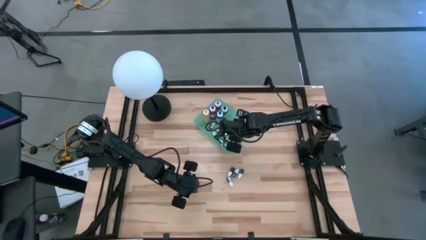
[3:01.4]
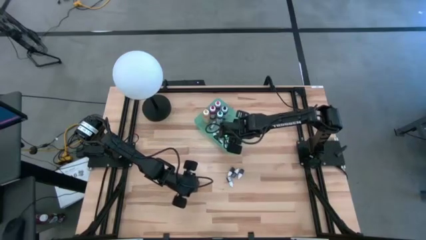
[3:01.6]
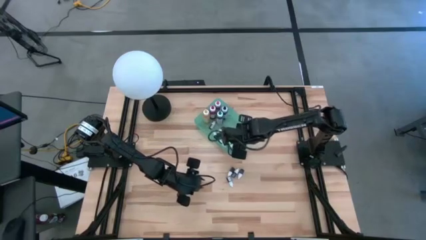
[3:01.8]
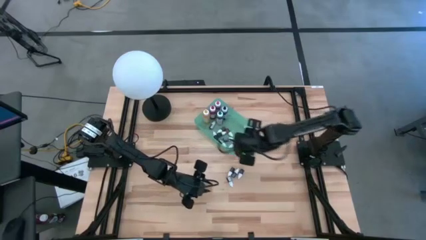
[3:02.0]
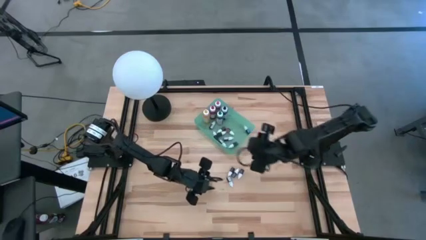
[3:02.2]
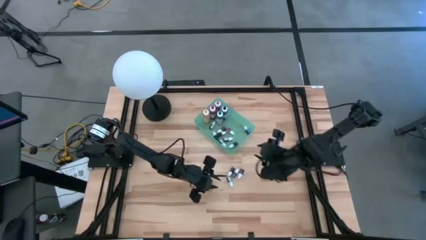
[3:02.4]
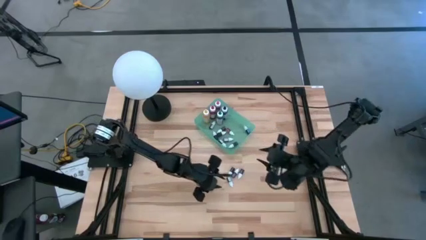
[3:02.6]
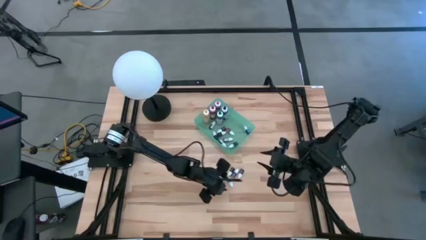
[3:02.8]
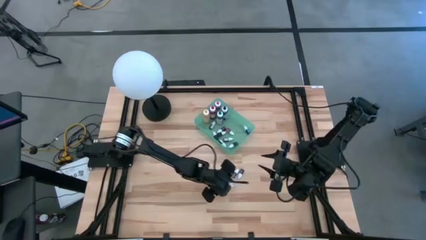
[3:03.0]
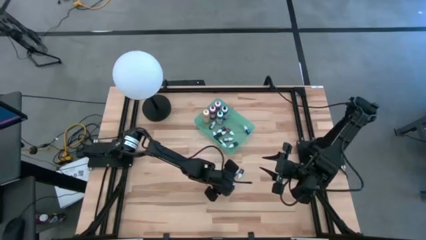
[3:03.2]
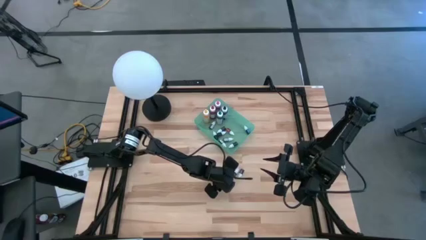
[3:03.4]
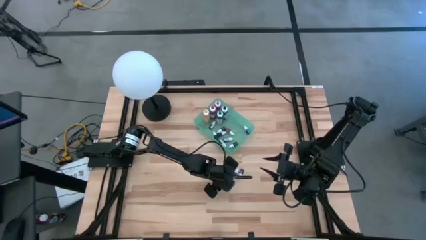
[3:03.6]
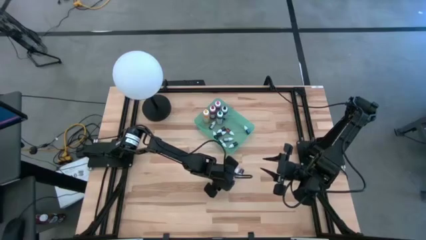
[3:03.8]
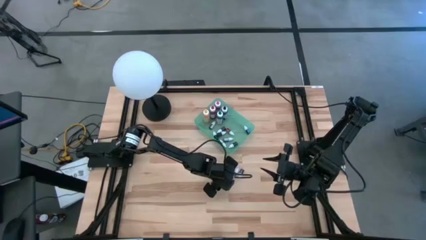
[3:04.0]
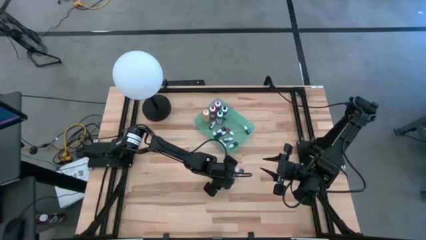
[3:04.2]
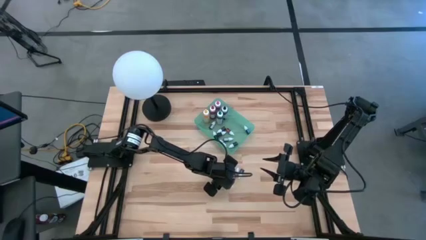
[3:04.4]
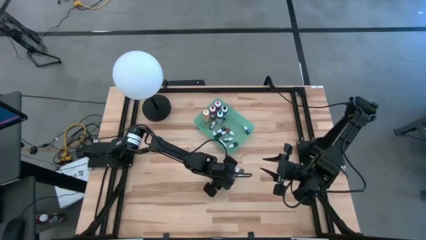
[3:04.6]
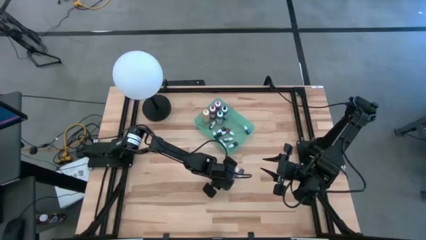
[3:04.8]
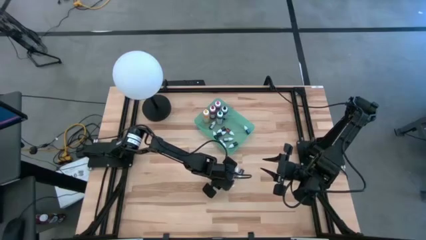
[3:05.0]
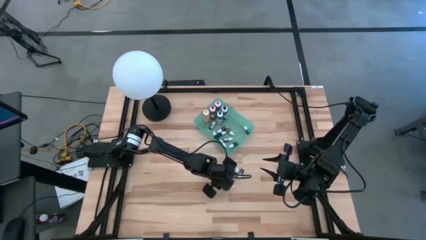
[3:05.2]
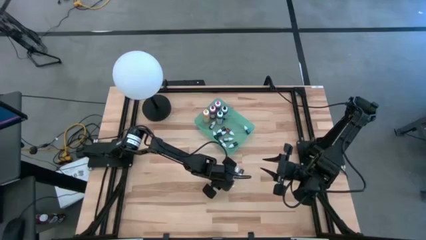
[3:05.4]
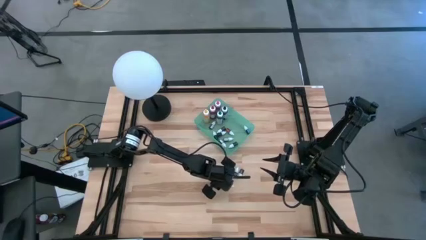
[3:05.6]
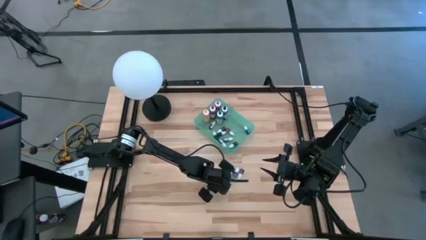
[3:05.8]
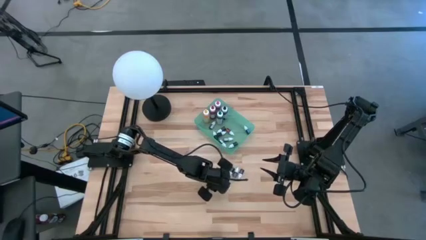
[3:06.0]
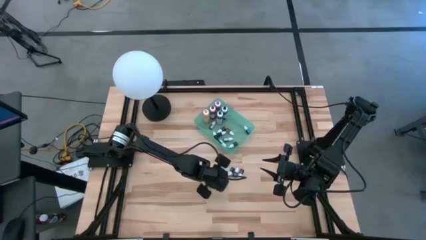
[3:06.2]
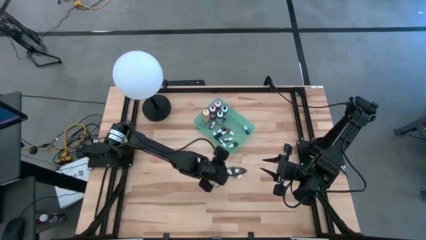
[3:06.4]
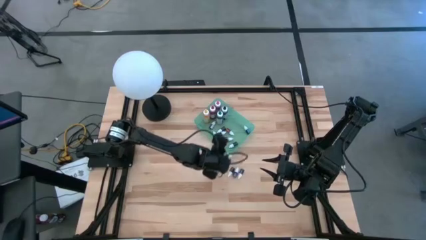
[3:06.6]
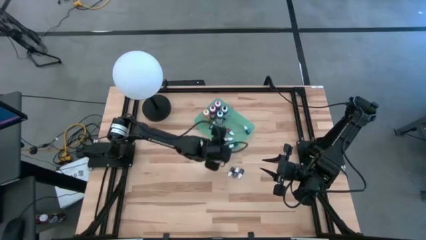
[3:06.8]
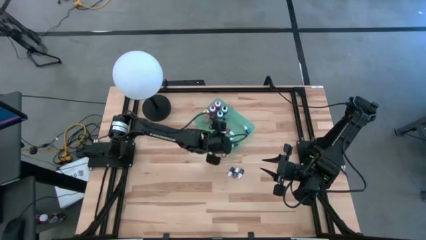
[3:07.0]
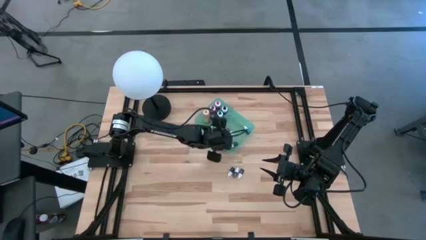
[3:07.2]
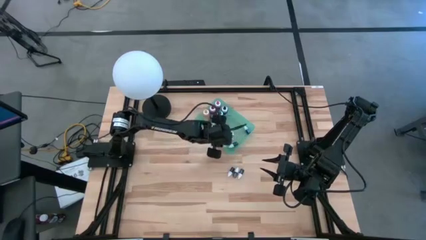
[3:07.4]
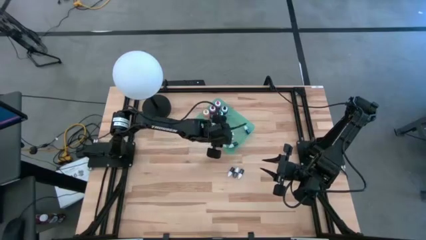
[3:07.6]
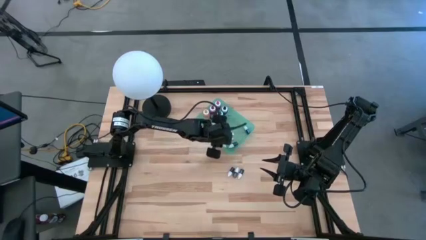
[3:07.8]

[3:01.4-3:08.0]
Task: Pick & Place food coloring
Put the small black food coloring bottle into the green bin

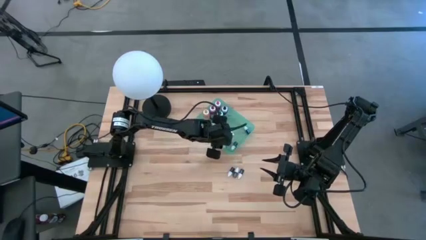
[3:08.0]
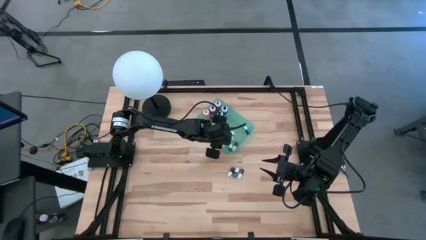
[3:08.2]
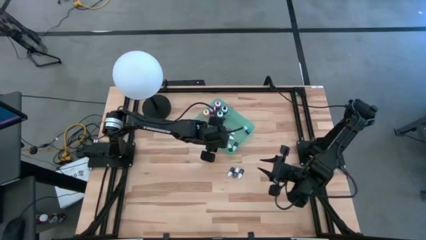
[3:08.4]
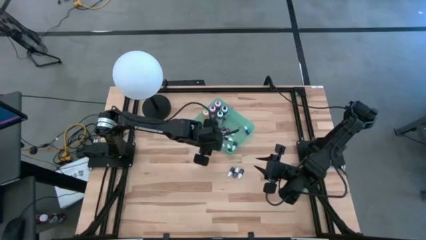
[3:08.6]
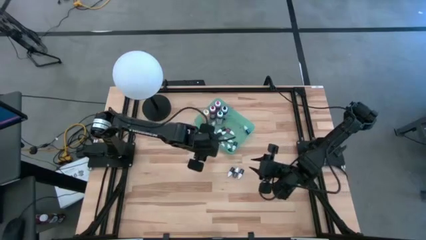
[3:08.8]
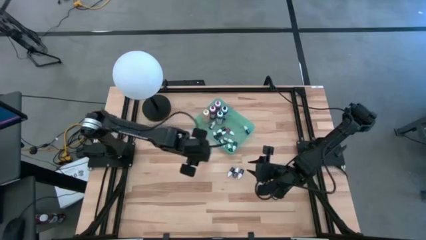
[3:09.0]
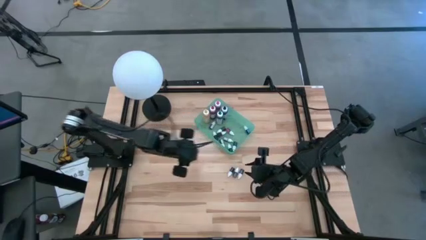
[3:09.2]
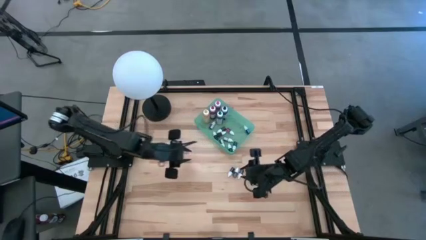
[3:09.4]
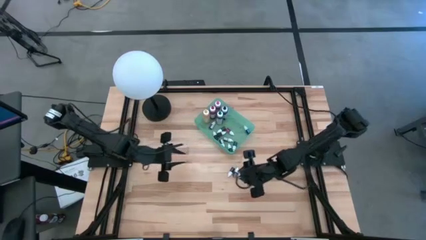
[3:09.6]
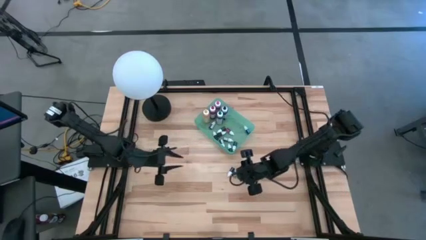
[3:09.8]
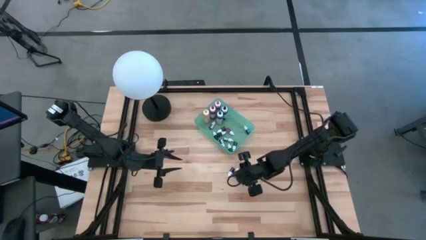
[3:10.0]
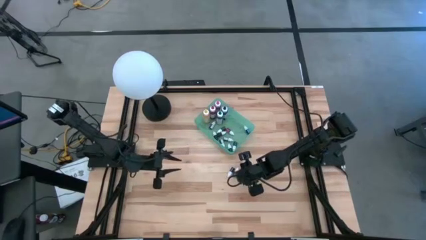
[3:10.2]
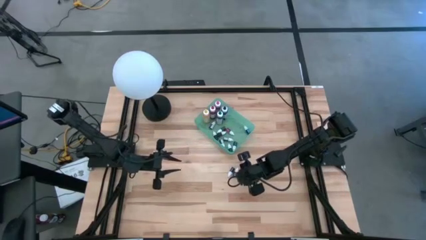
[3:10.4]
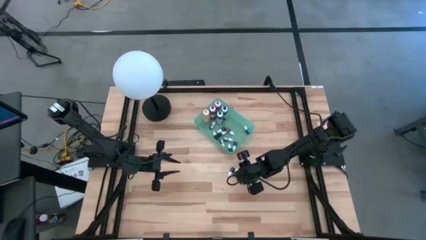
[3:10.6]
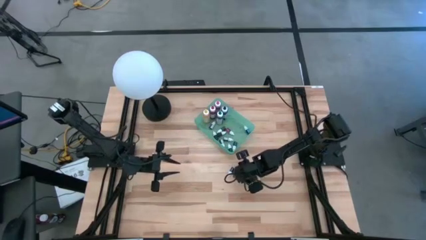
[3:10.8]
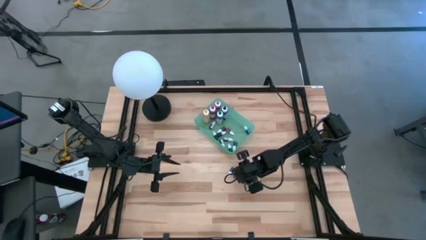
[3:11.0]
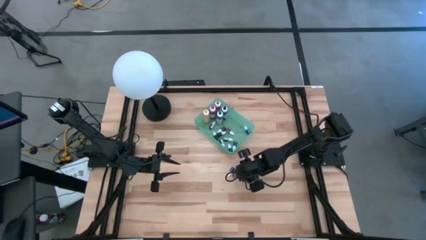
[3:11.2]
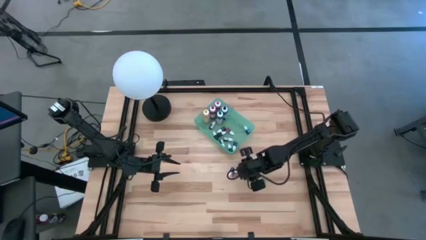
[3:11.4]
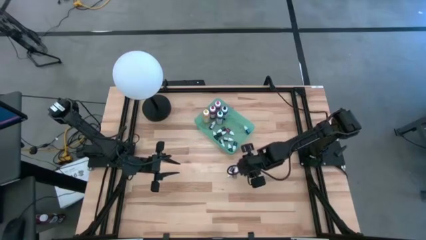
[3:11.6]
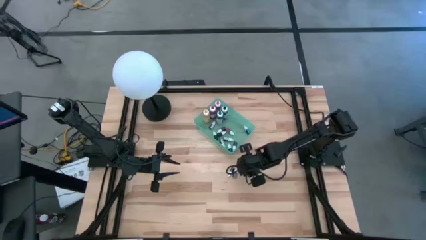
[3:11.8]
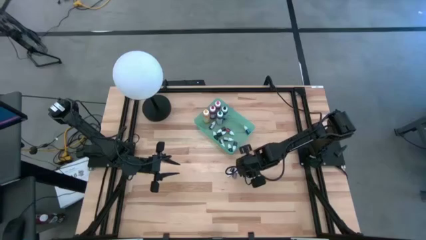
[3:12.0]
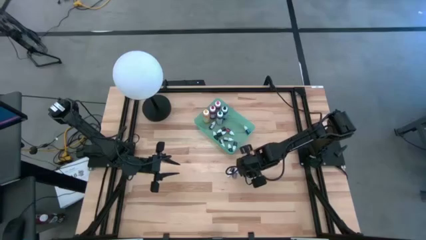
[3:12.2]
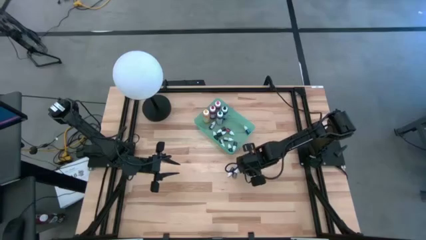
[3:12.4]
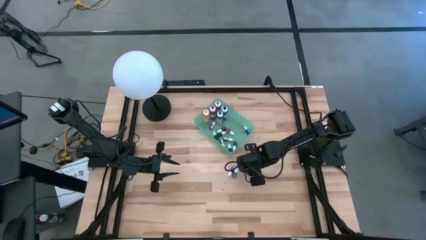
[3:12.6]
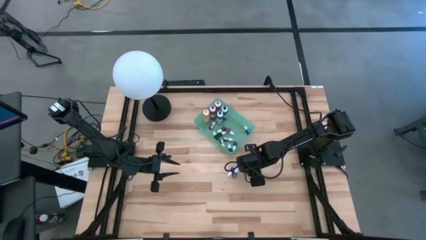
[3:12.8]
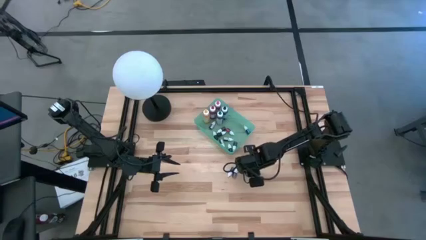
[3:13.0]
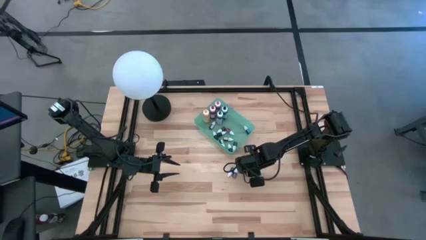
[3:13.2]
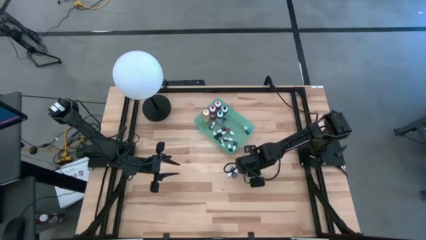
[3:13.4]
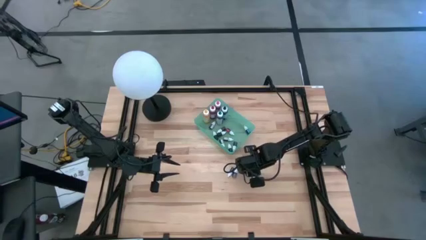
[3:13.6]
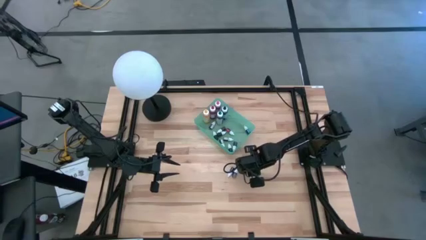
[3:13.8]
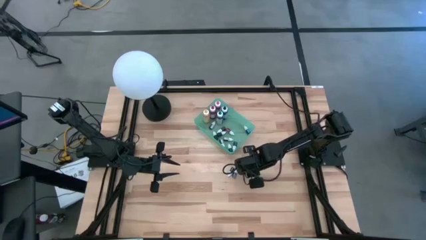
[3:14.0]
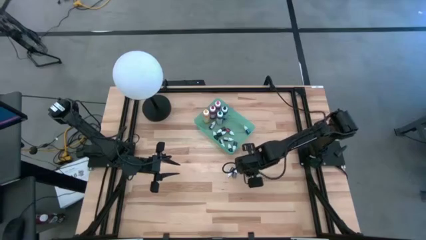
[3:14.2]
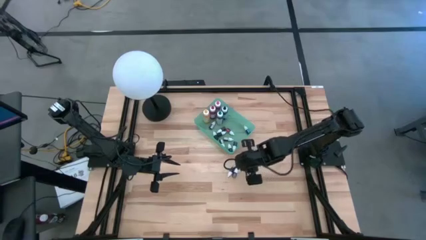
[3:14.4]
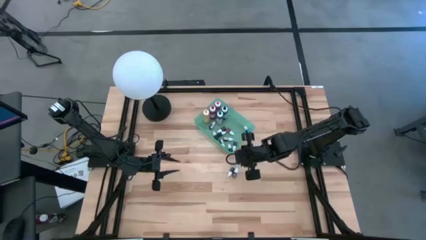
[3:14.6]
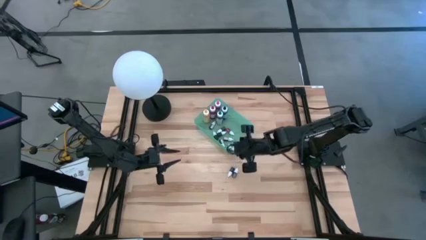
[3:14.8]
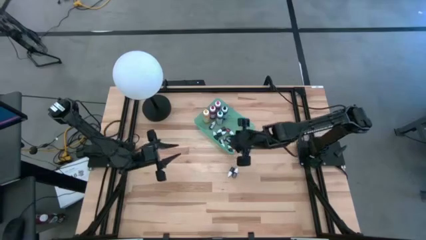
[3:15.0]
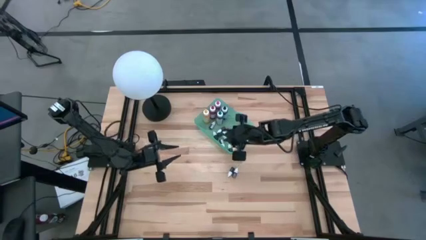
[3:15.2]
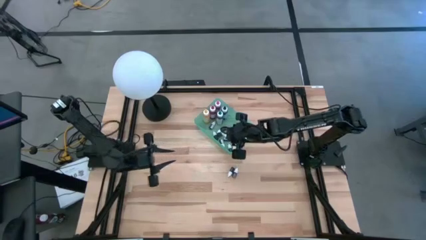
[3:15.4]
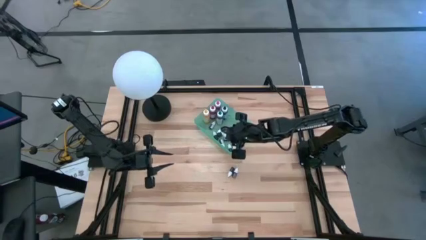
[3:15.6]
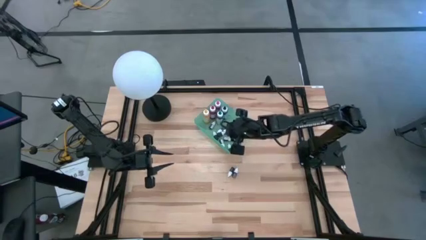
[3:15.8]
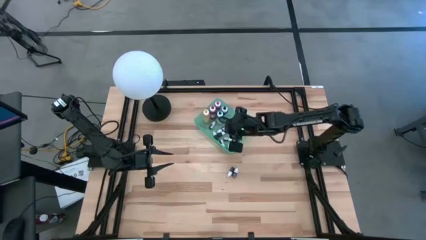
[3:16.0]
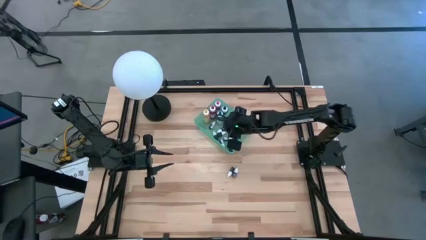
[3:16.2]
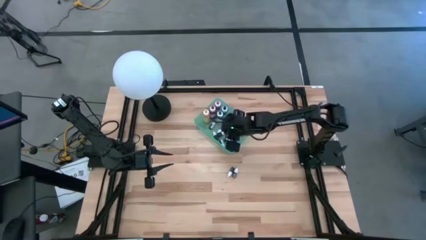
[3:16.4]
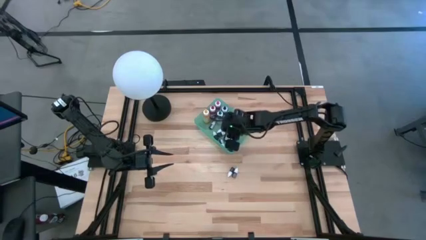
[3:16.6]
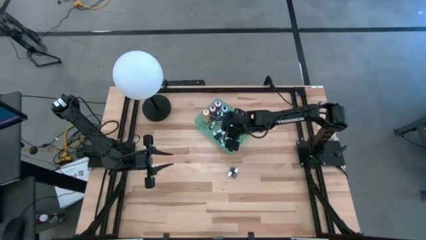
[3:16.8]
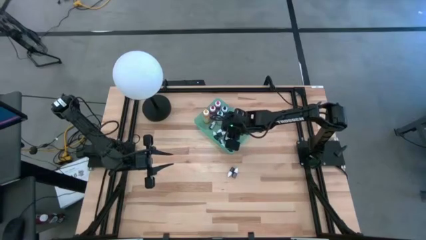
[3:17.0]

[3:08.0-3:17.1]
Put the small red food coloring bottle into the green bin
